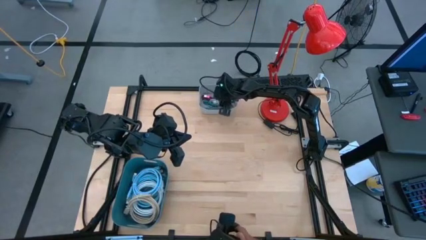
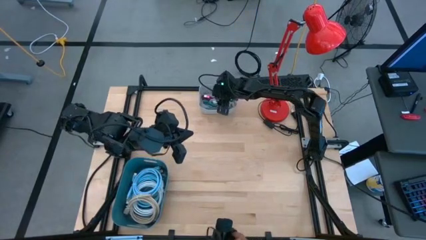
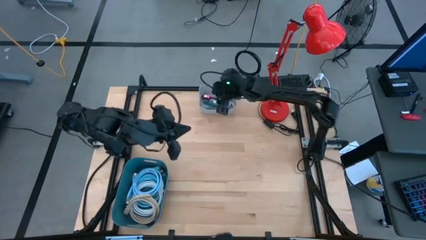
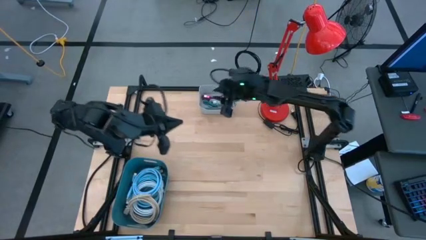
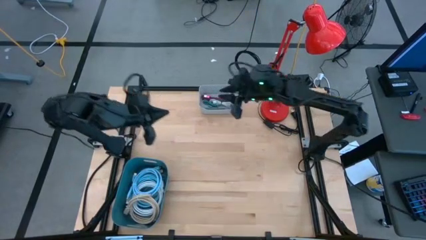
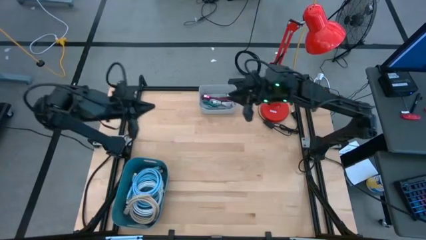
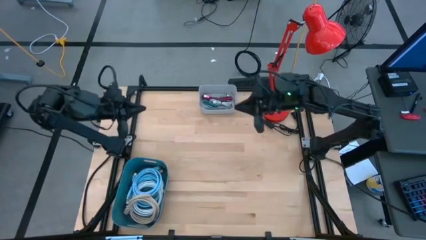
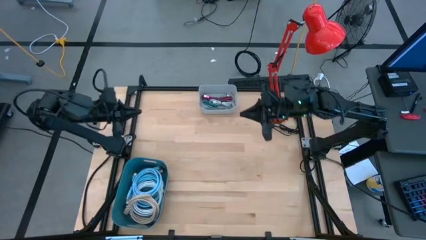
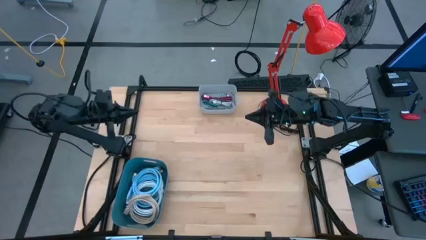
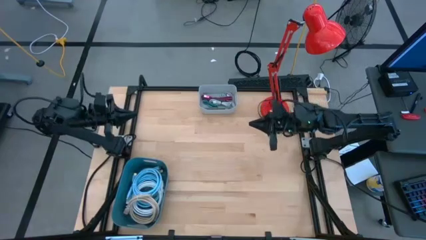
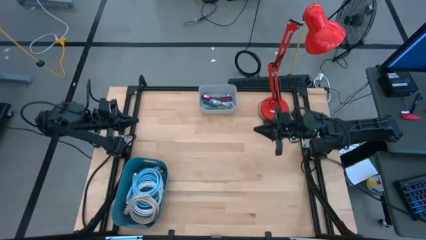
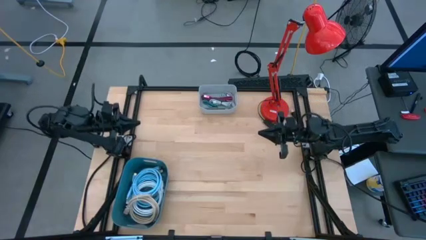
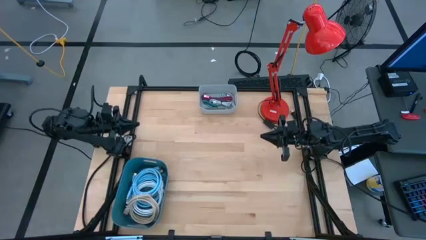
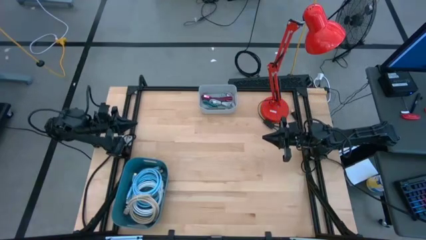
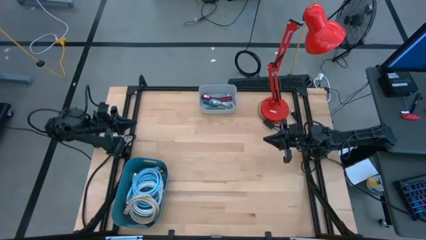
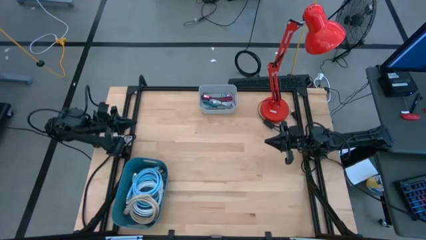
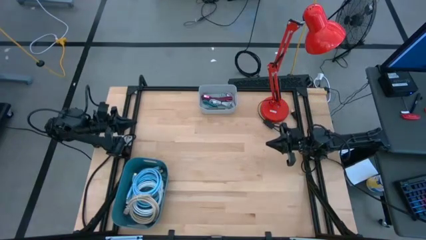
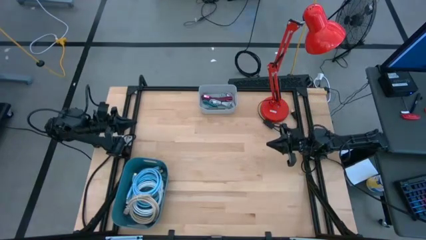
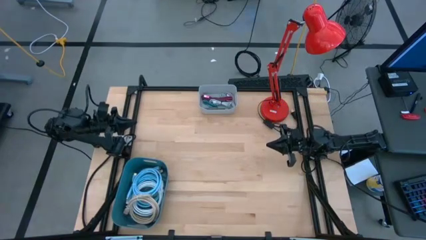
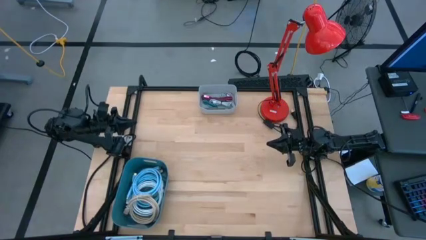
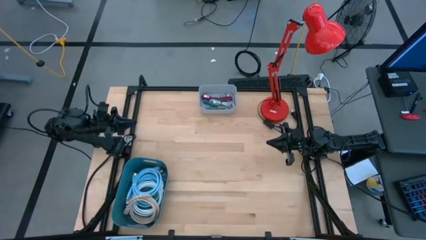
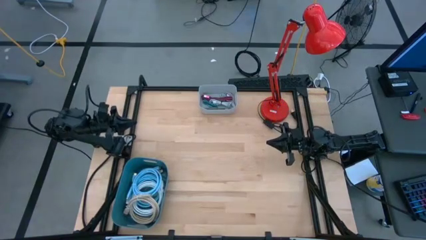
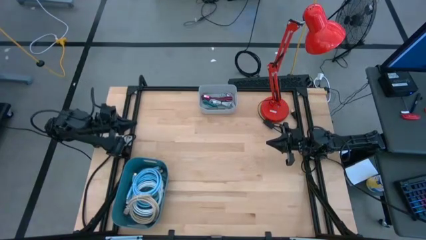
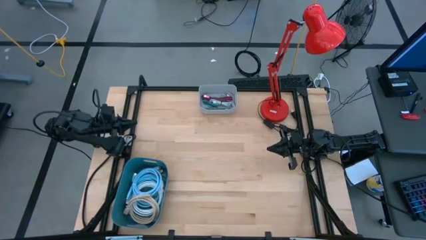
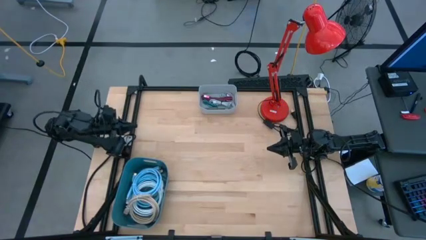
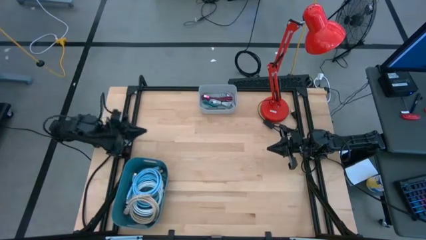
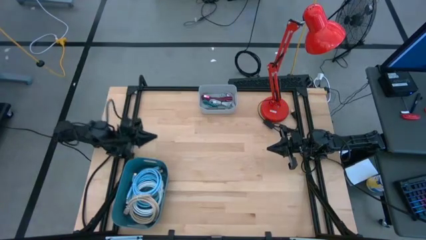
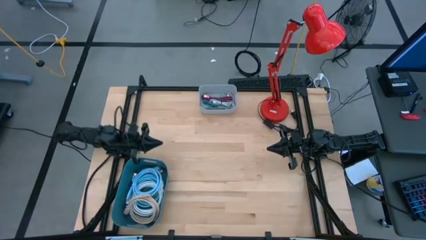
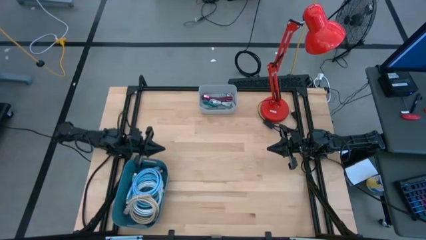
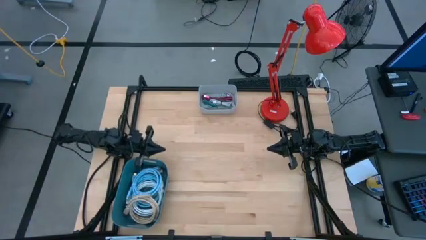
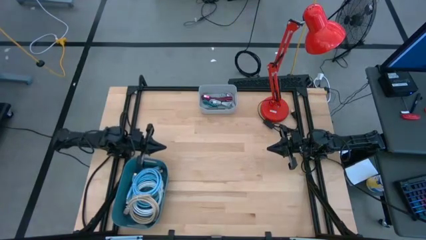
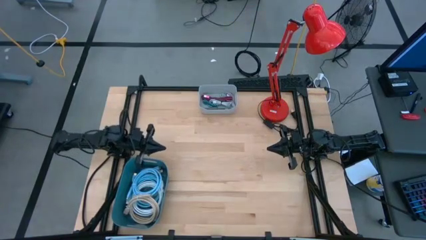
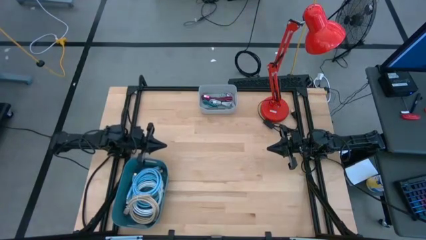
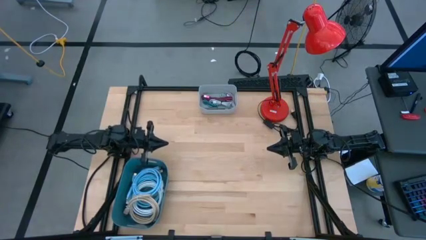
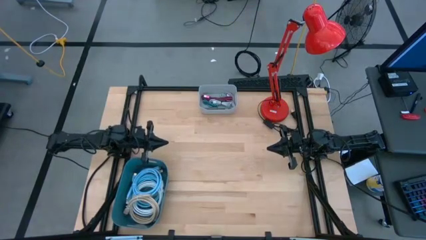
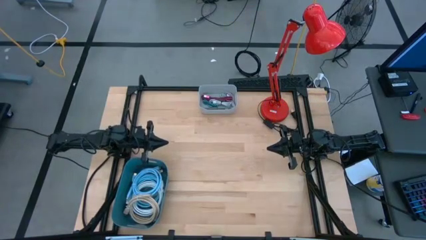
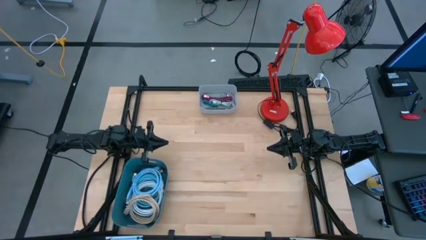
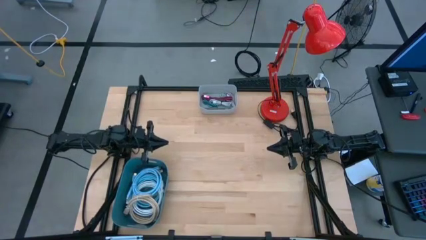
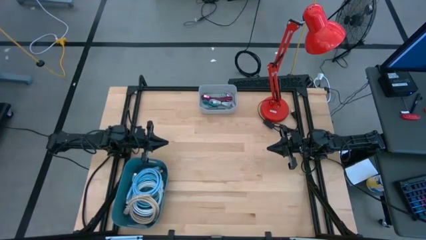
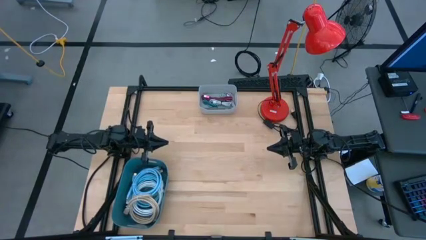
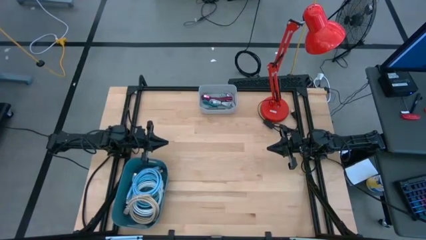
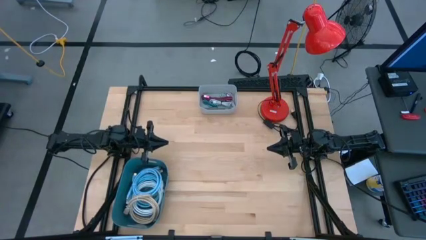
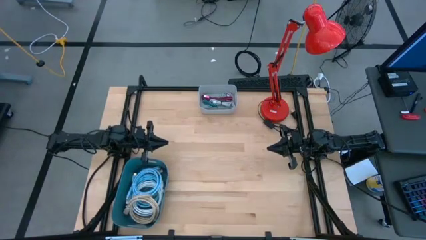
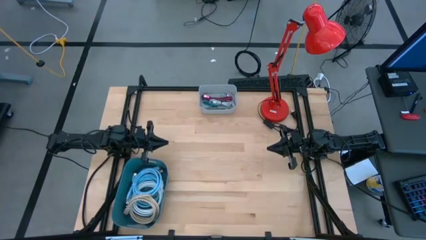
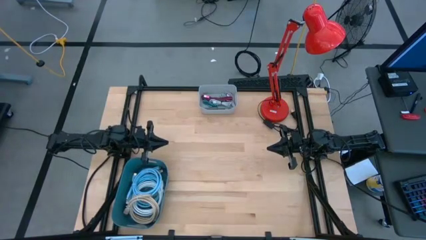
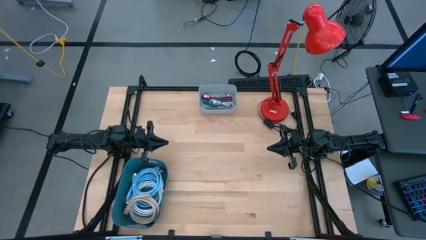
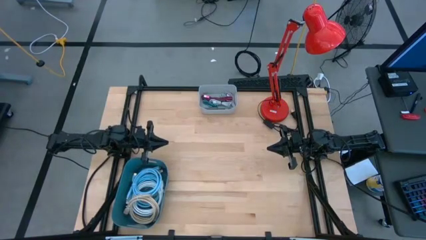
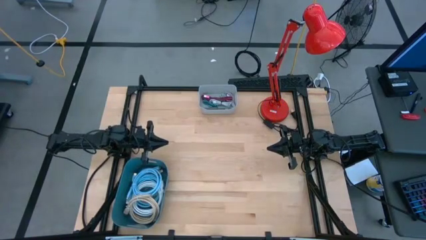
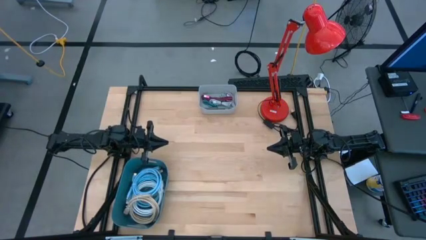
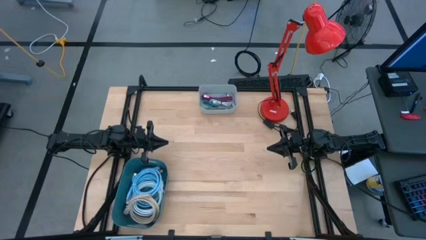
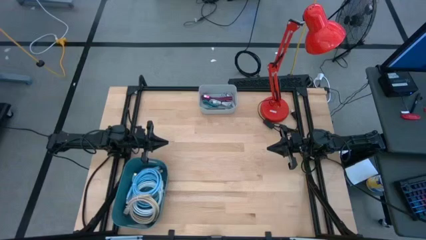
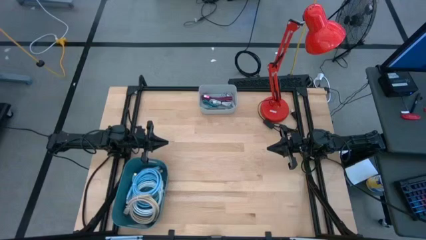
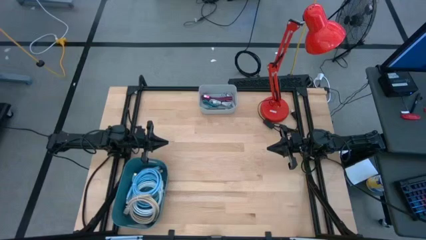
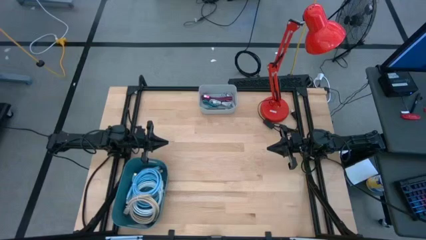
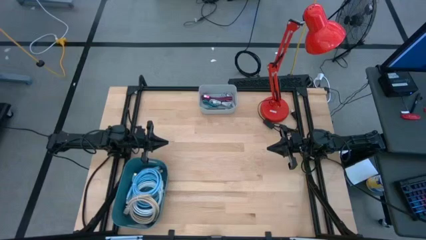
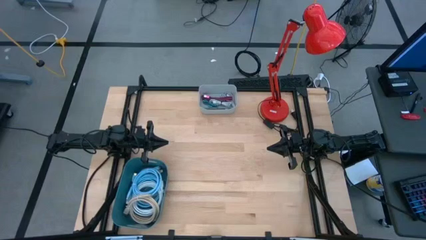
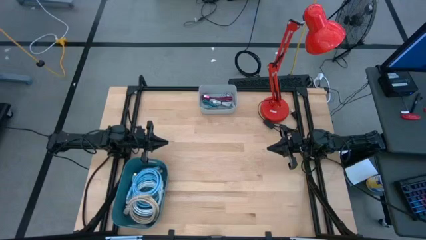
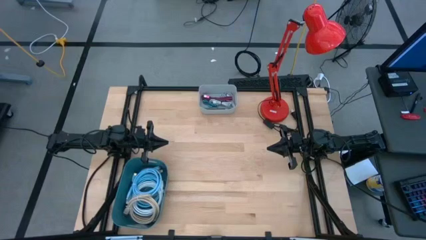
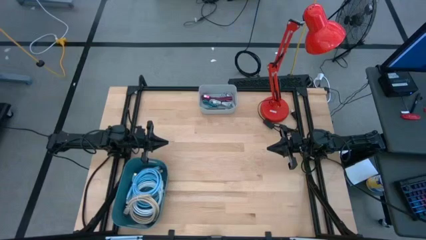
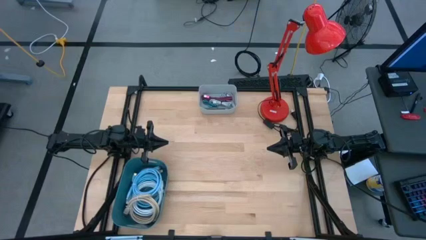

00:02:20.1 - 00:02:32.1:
Task: Pick & Place USB Port
Return to Home Position

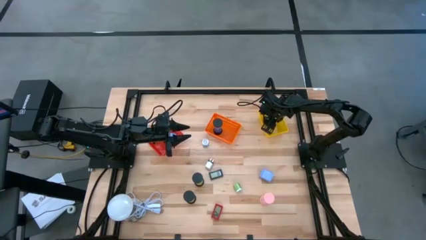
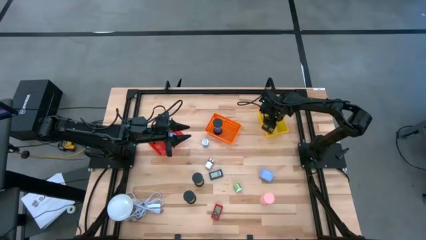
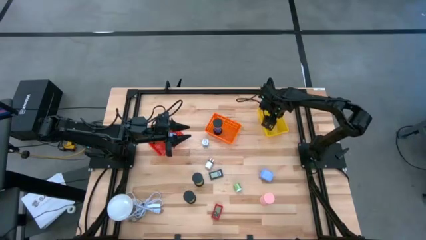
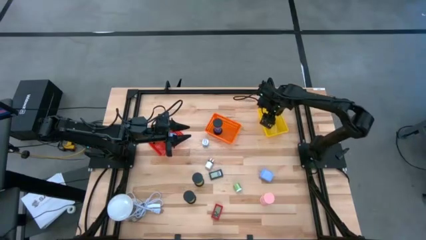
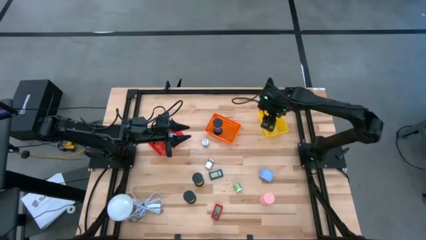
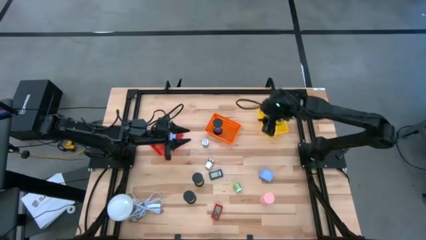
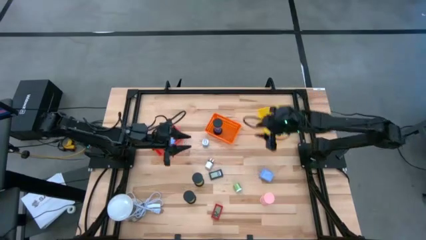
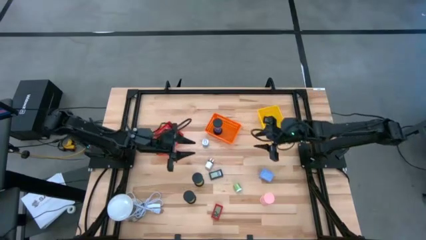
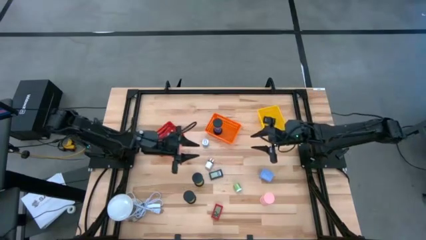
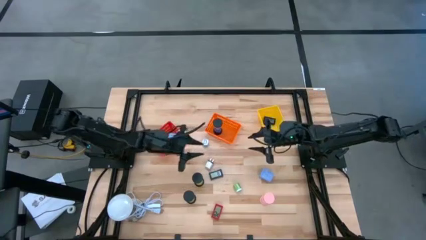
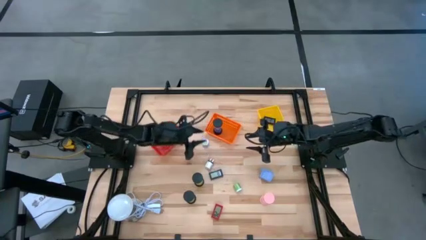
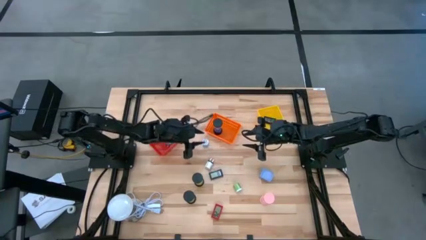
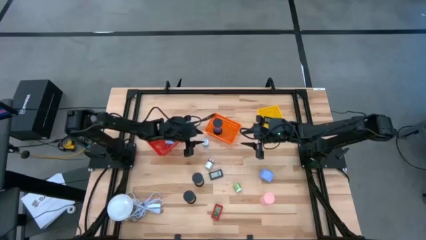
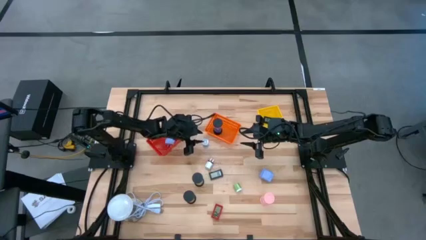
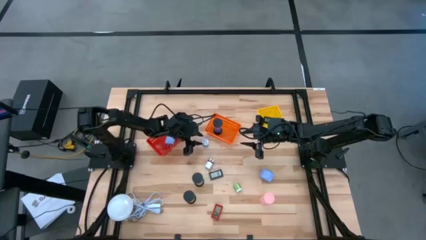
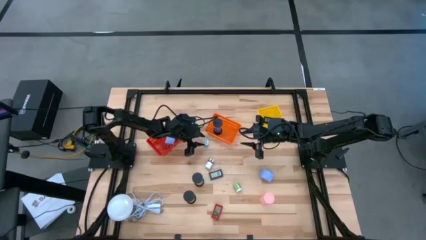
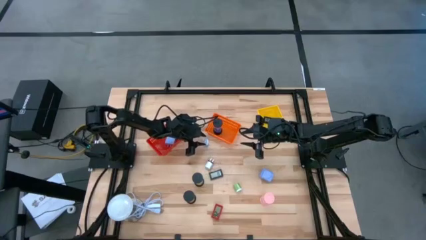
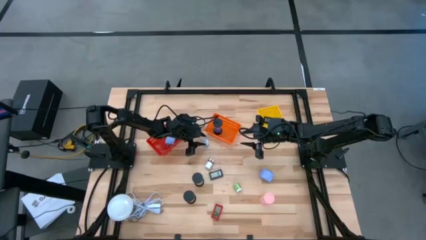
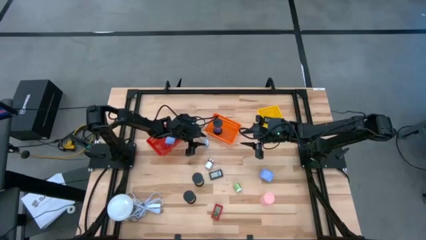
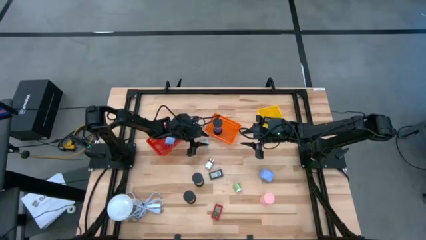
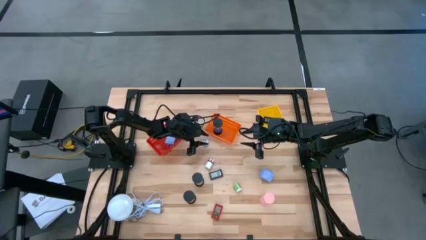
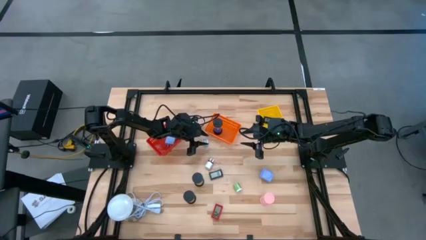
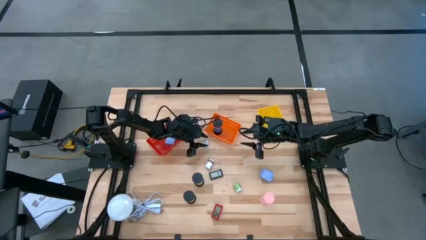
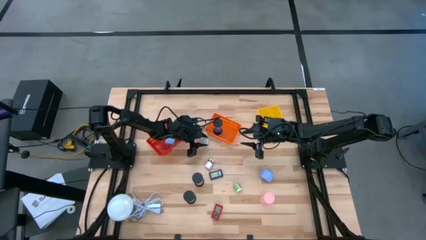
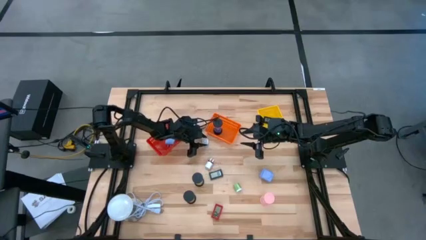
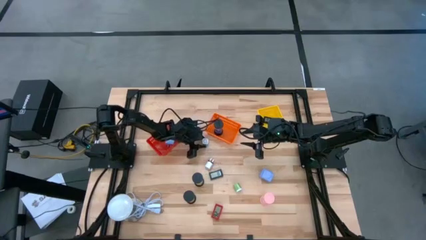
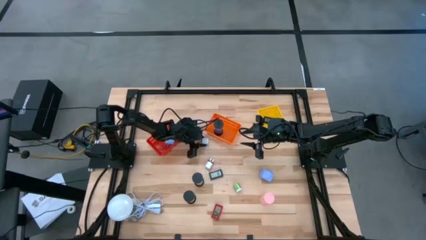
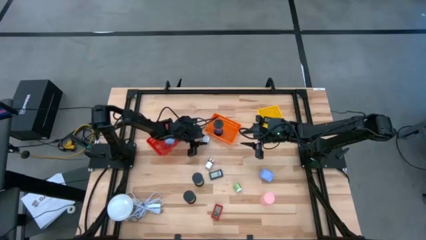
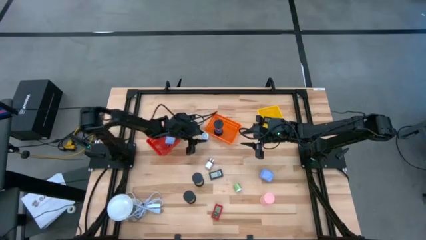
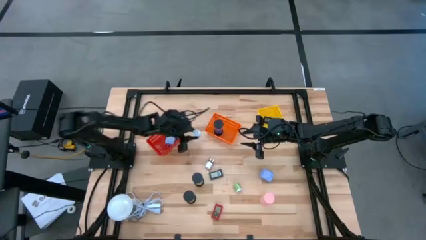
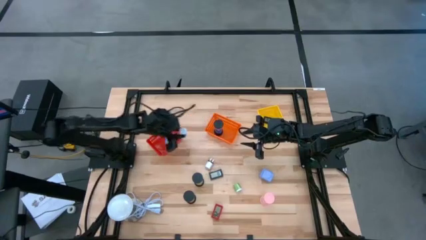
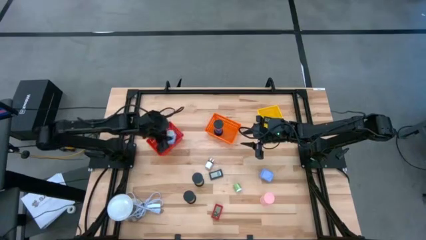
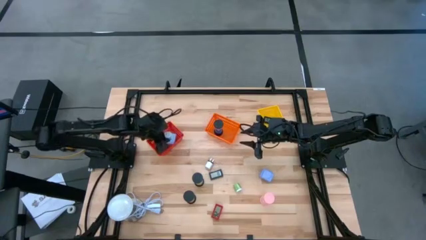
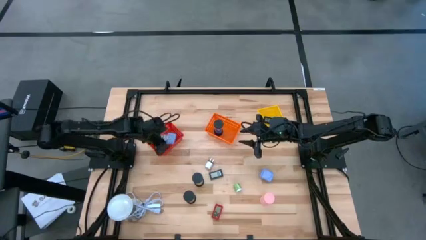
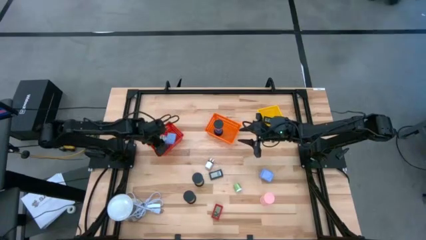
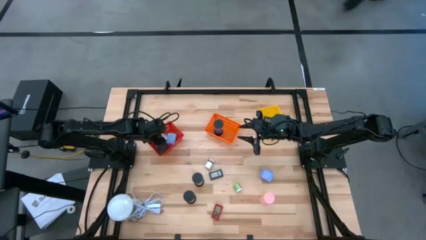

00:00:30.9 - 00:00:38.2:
Task: Pick & Place Office items
Put the blue charger adapter into the red basket
